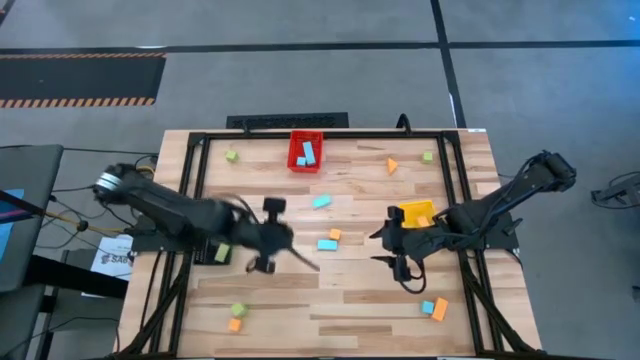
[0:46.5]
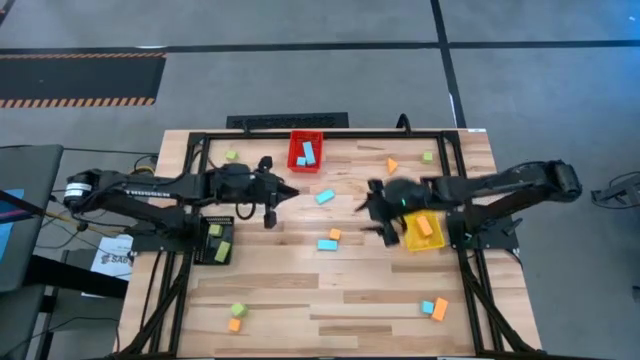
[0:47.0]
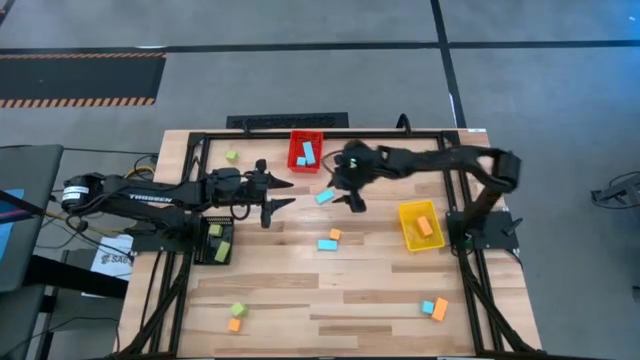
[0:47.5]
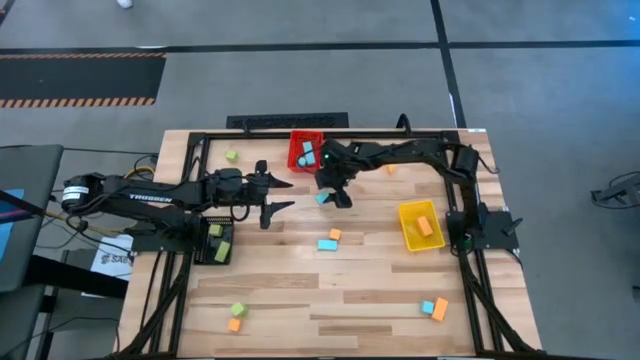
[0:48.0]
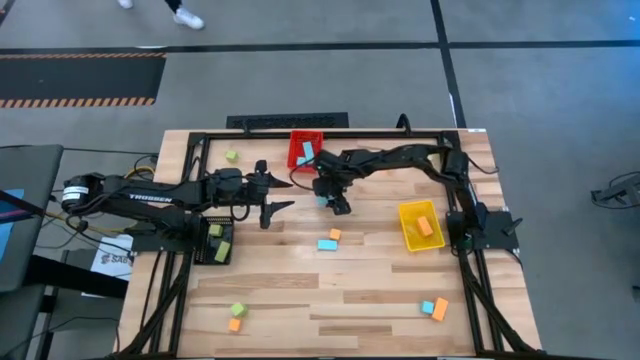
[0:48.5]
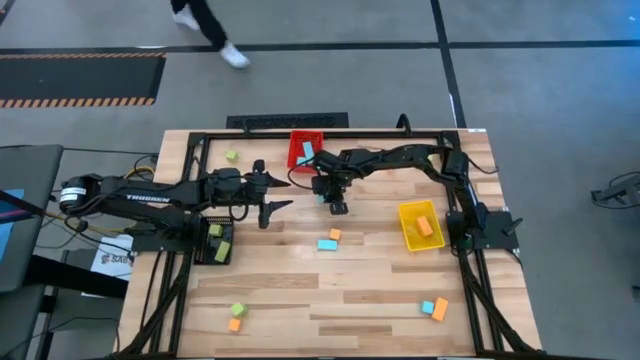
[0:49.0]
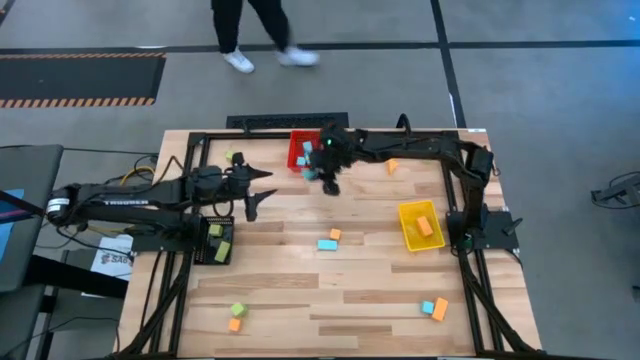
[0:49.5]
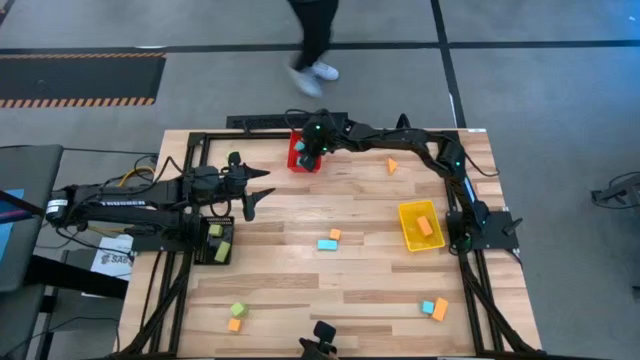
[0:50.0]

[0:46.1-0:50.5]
Task: Sort & place blocks by color
Put the light blue block into the red bin

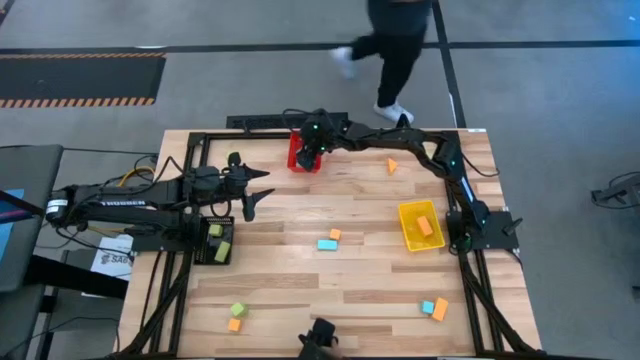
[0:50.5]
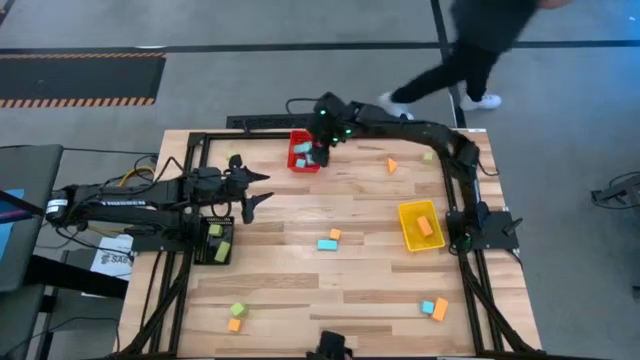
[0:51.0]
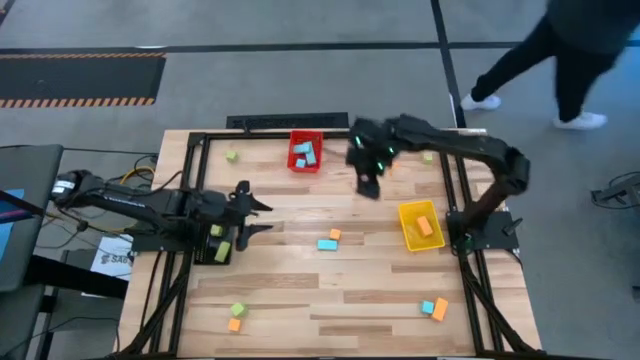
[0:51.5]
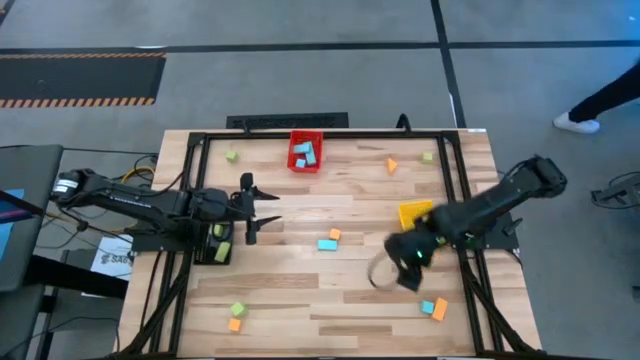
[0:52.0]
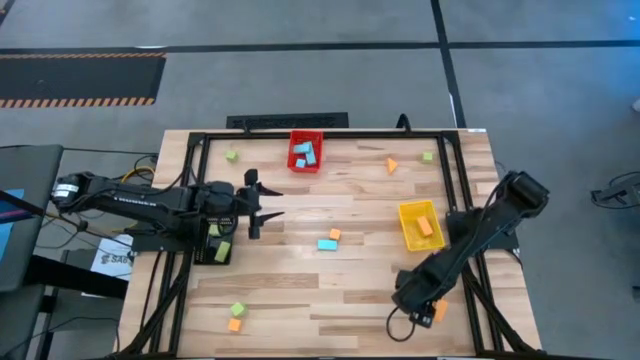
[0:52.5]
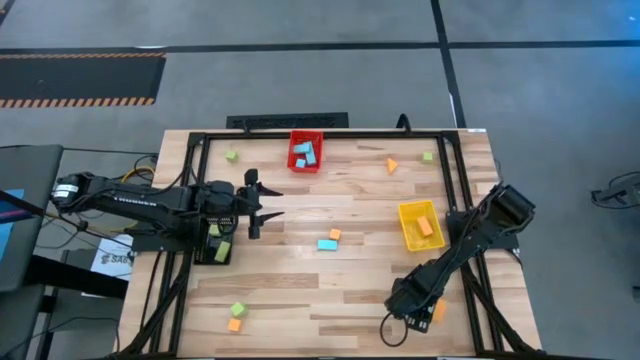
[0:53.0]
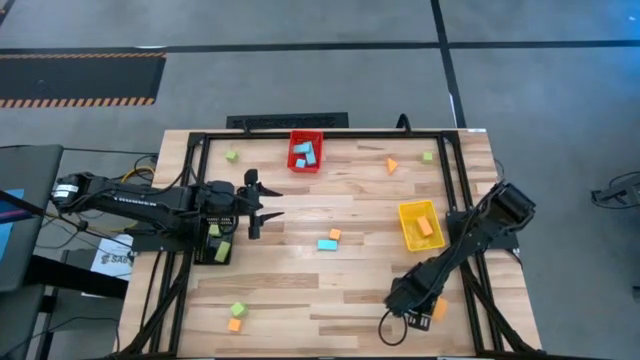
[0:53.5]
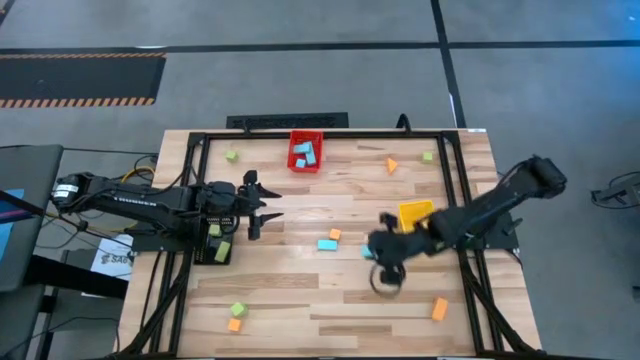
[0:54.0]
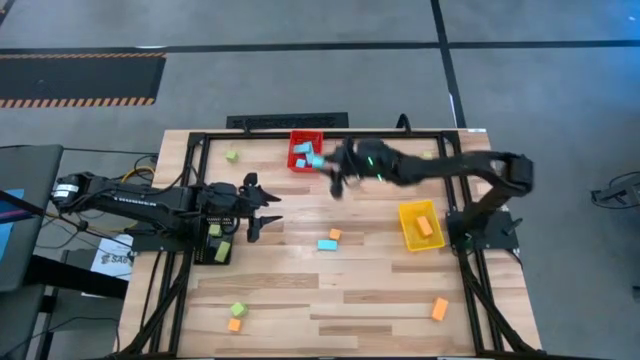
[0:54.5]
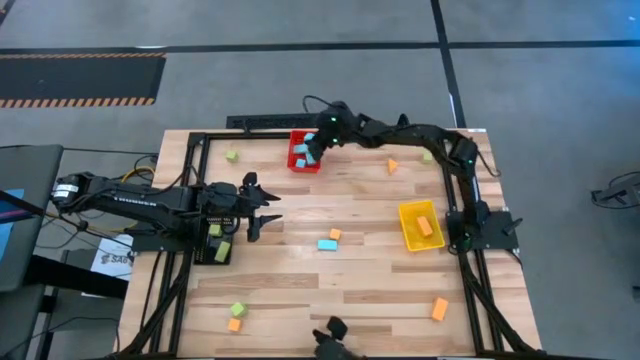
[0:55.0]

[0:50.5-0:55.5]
Put the light blue block into the red bin

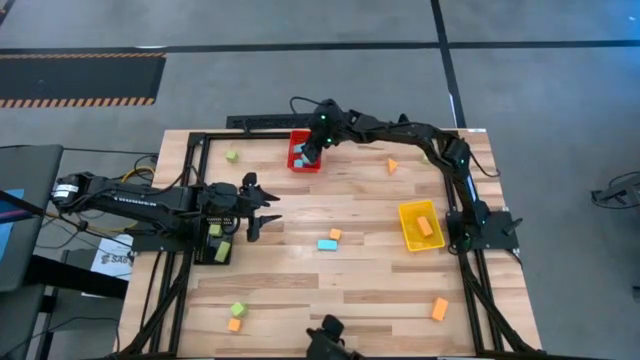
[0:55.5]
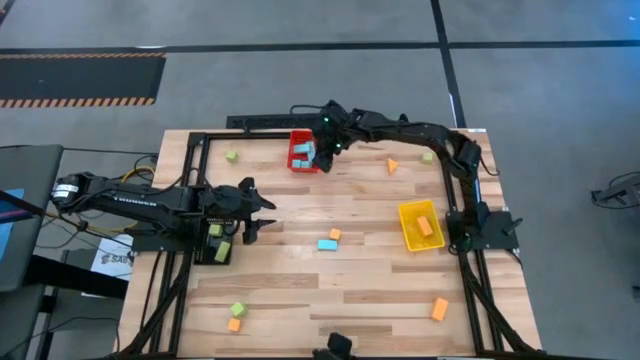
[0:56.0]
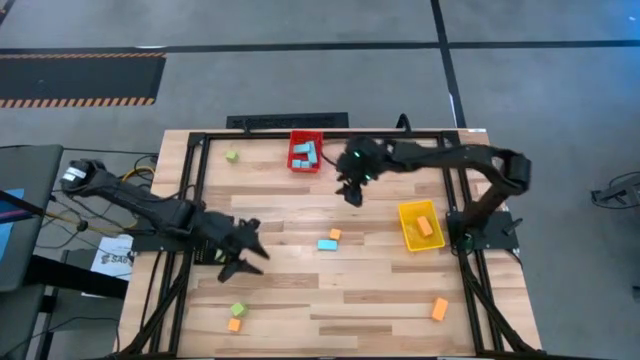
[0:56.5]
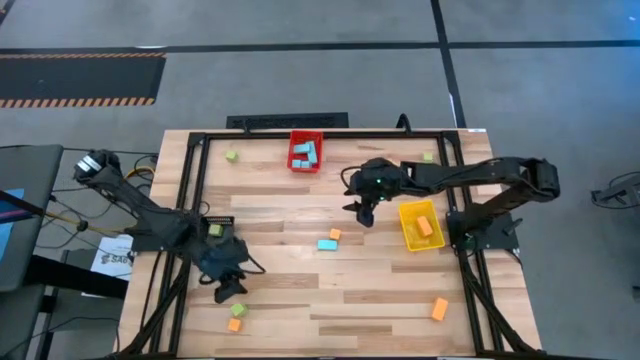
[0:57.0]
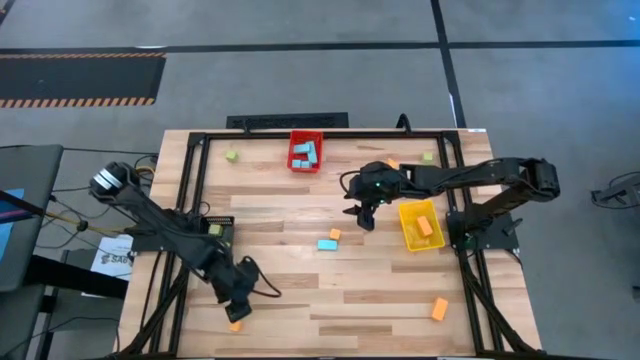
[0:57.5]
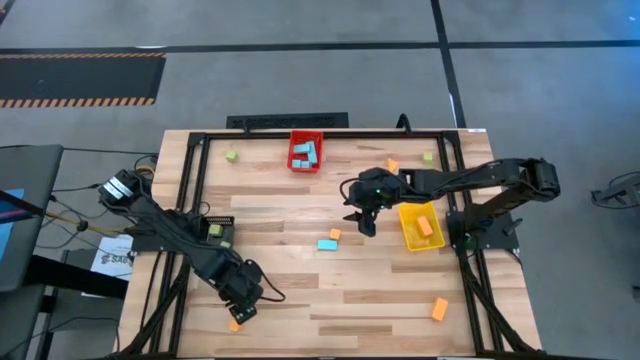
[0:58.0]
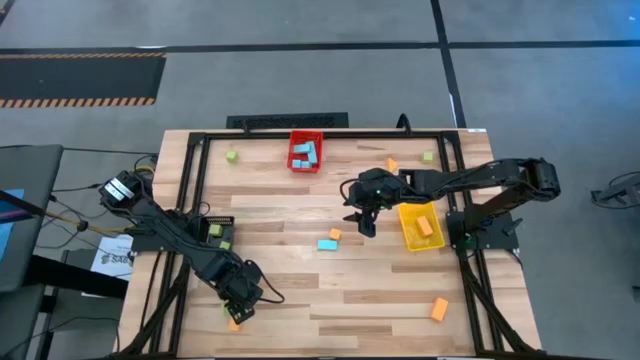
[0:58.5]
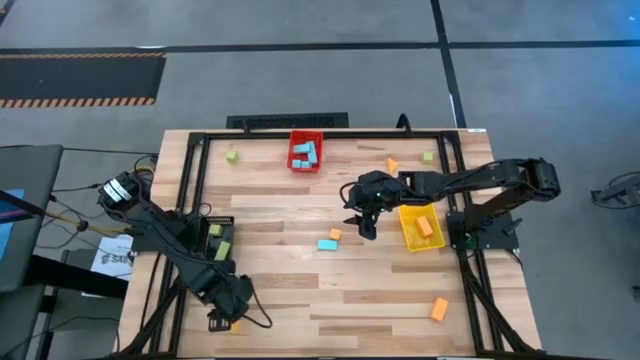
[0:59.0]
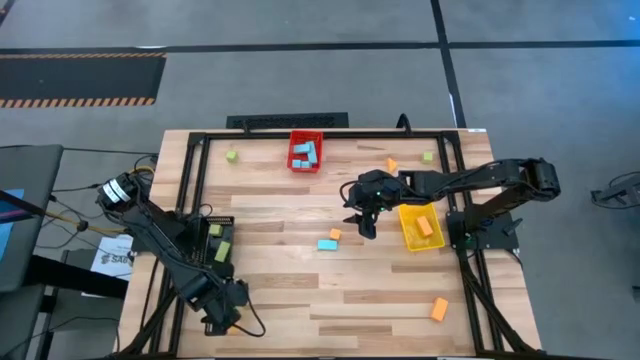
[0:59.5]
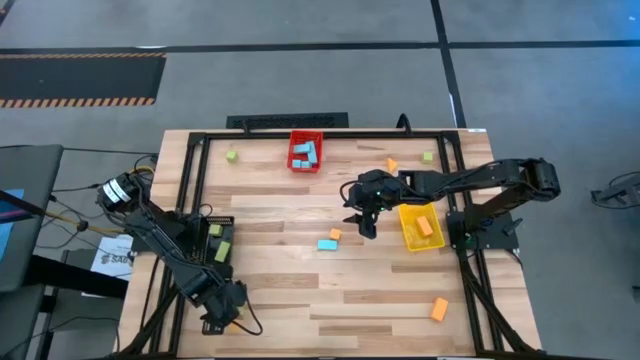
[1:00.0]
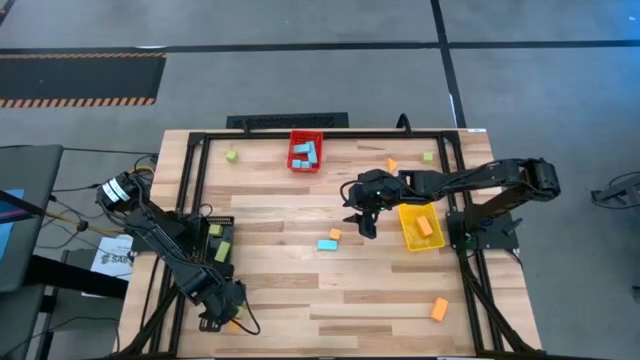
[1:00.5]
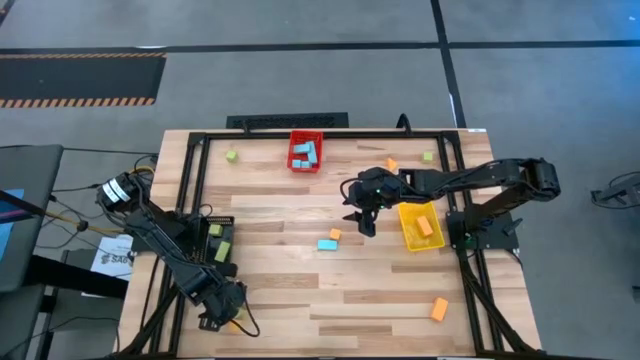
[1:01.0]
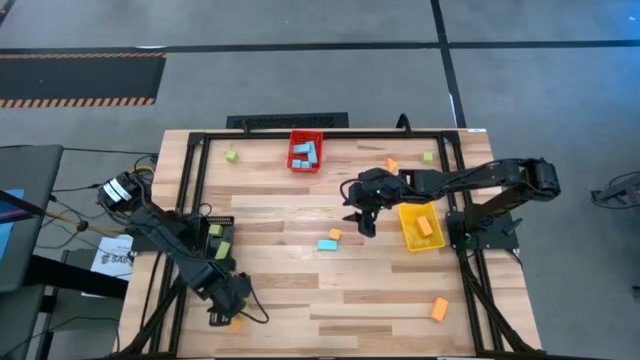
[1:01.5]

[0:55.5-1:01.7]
Put the light green block into the black bin

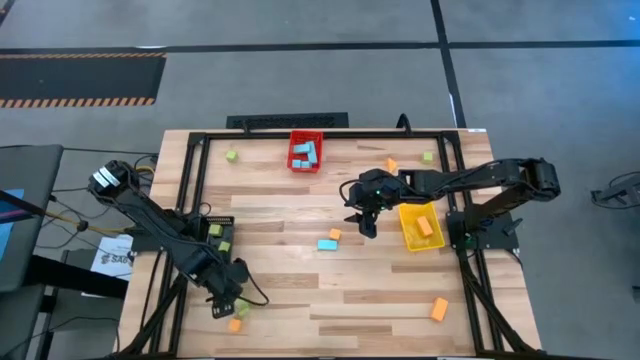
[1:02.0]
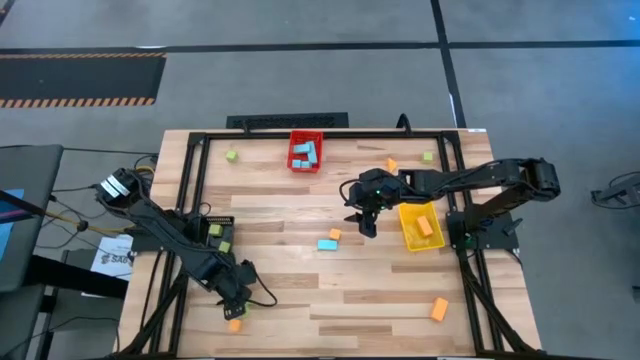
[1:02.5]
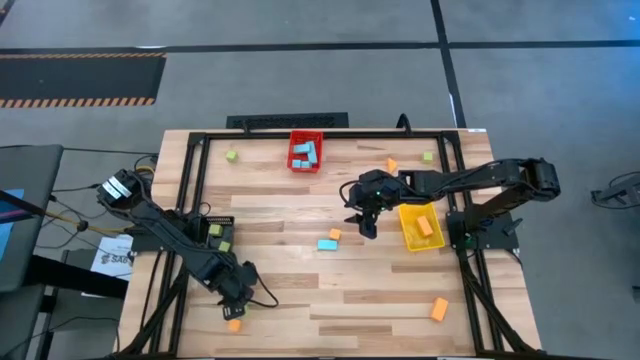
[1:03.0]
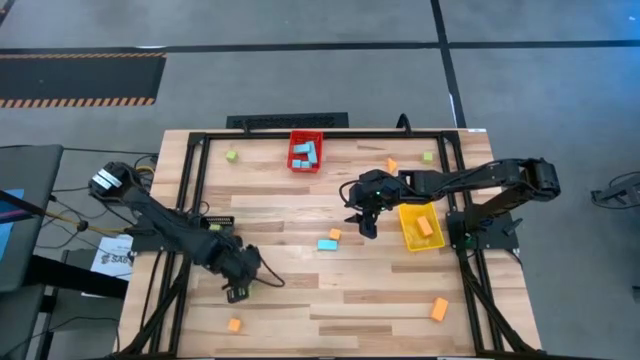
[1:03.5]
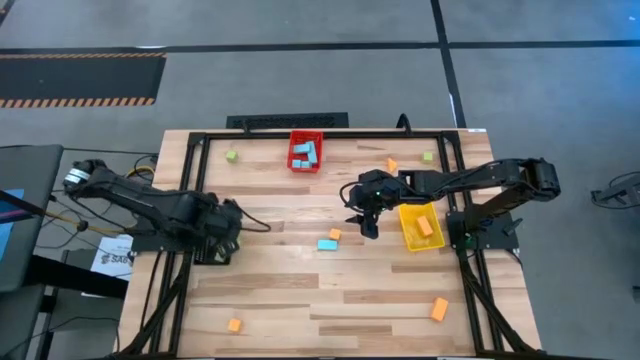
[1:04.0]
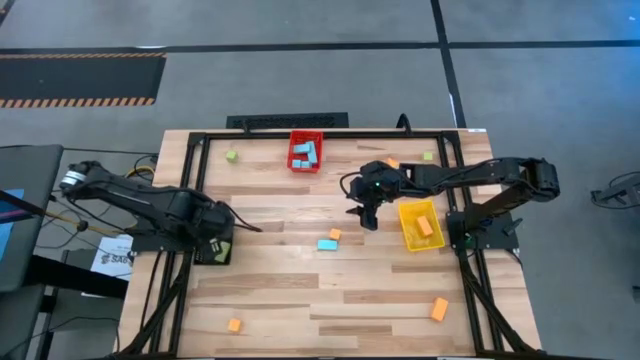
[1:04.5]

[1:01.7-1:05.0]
Put the light green block into the black bin

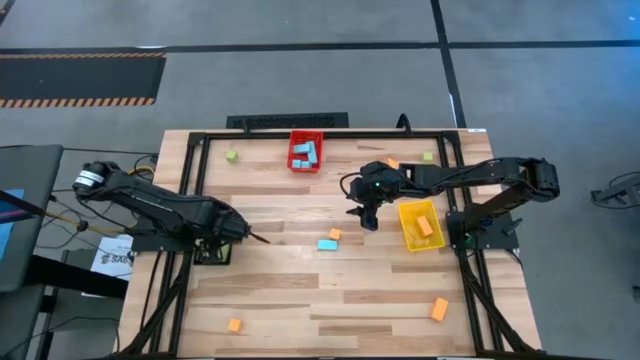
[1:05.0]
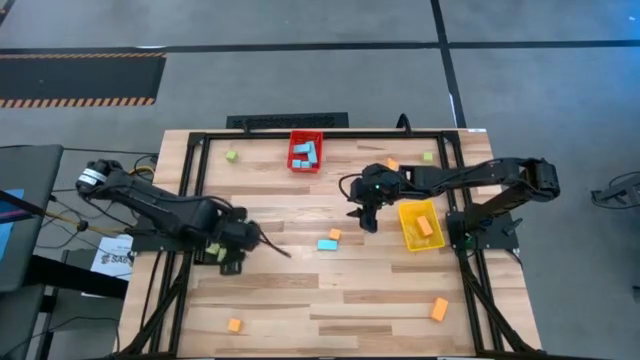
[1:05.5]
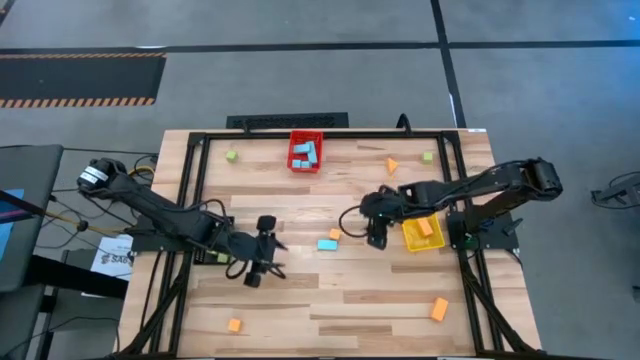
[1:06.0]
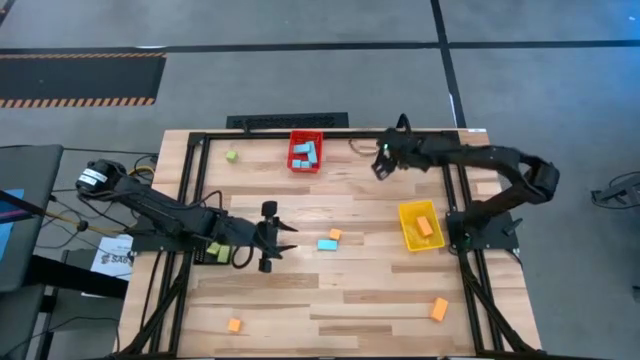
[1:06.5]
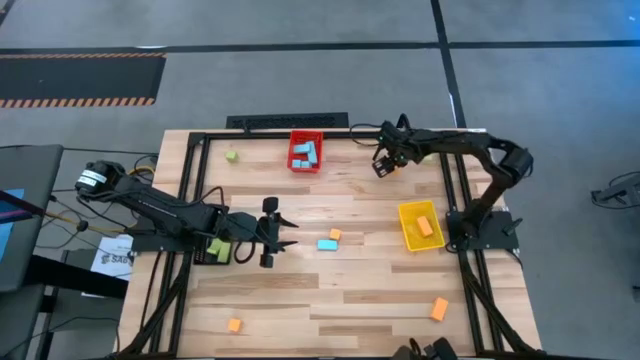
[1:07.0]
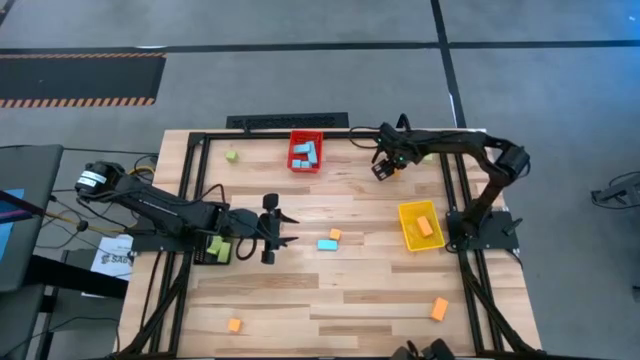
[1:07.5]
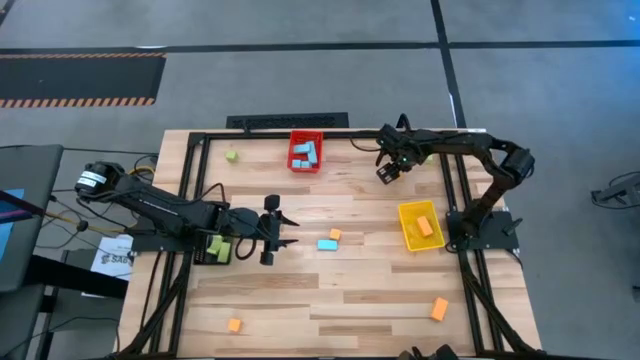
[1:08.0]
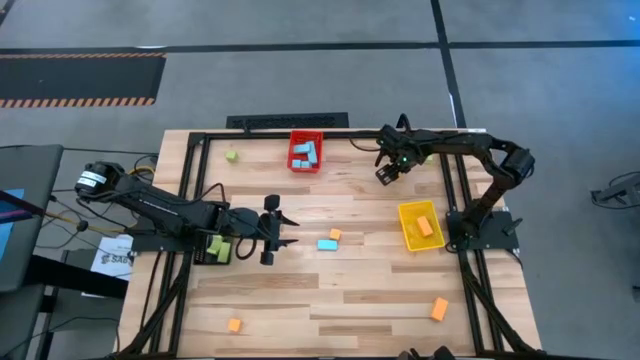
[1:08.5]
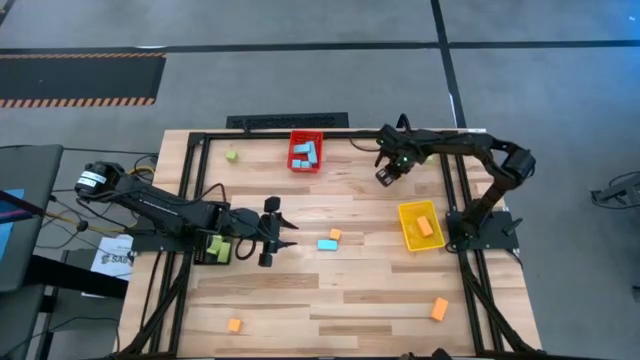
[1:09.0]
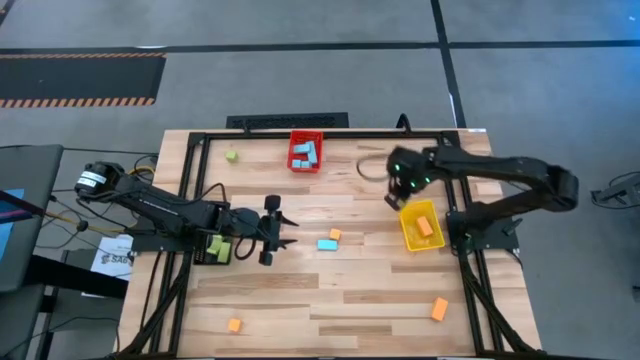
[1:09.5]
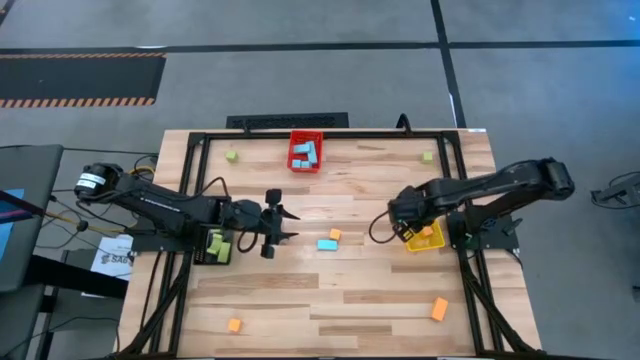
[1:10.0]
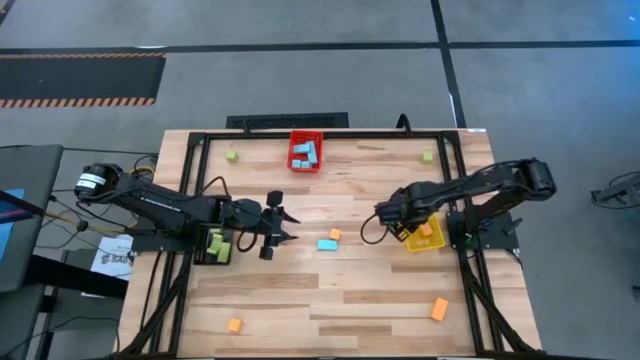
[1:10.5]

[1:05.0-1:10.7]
Put the yellow block into the yellow bin
